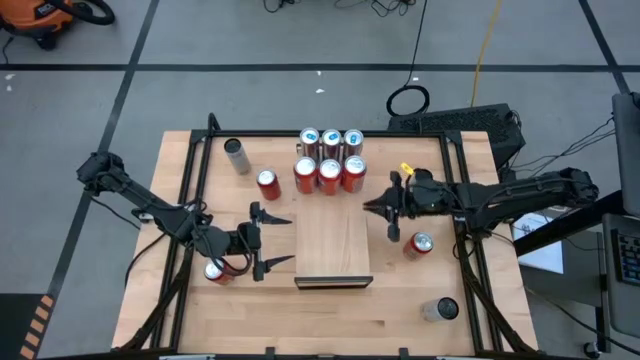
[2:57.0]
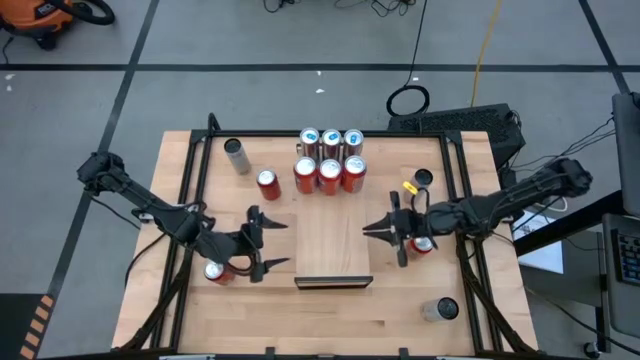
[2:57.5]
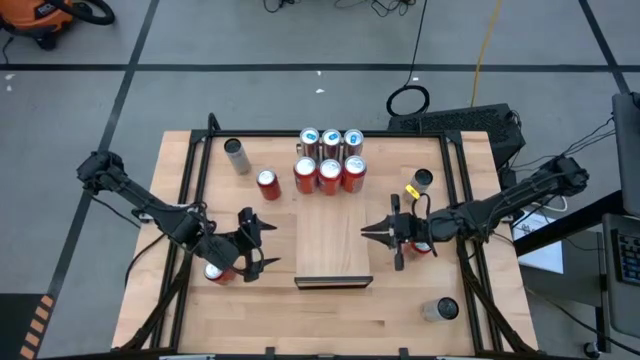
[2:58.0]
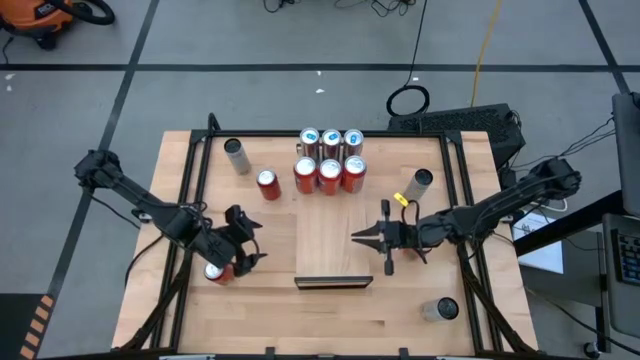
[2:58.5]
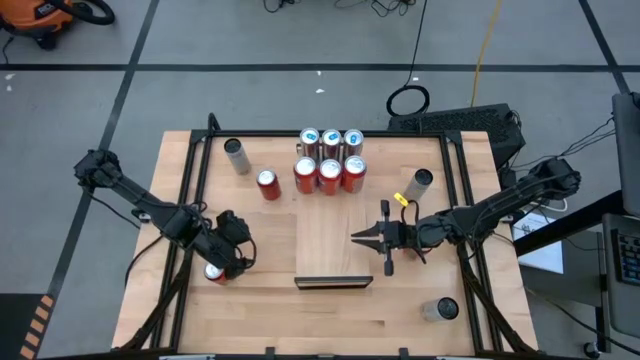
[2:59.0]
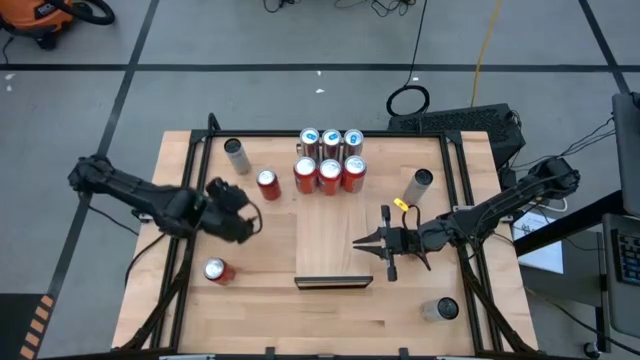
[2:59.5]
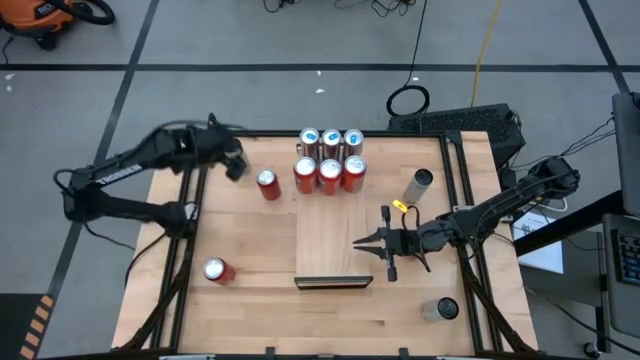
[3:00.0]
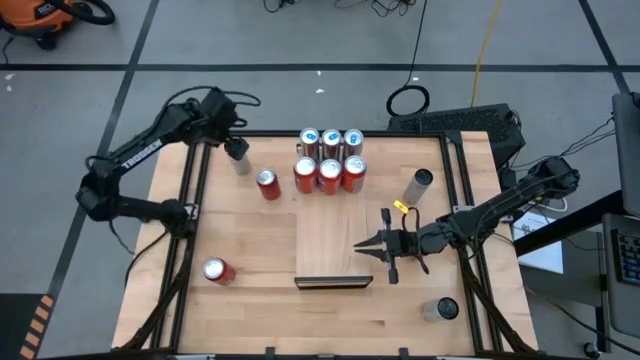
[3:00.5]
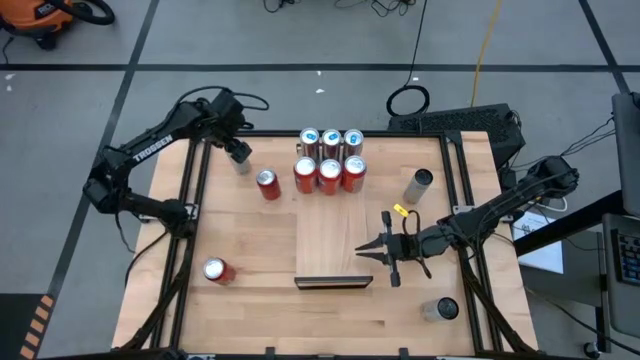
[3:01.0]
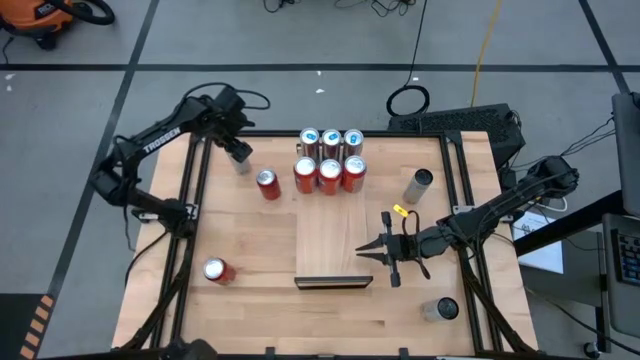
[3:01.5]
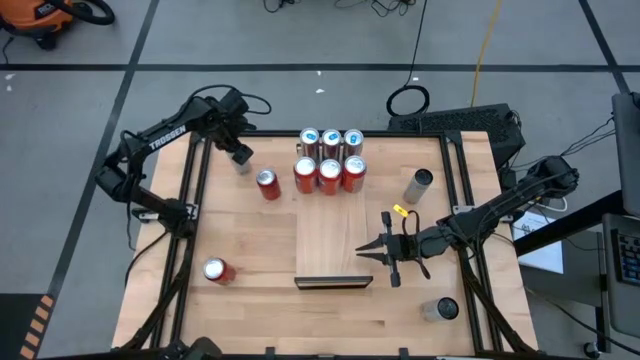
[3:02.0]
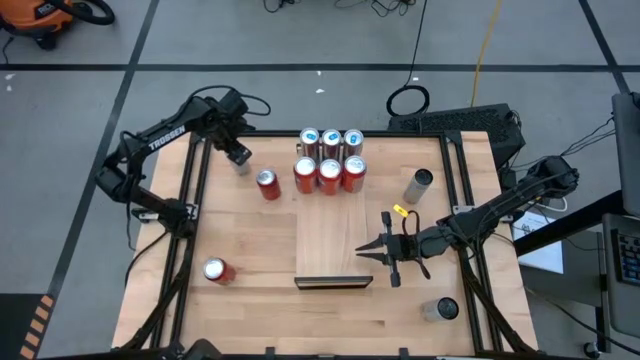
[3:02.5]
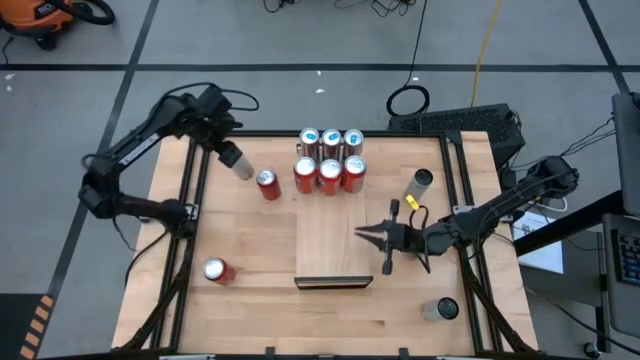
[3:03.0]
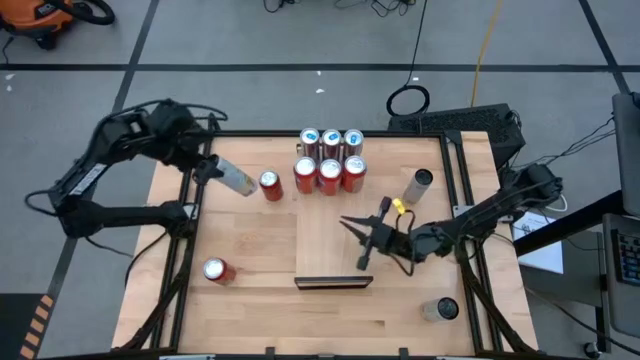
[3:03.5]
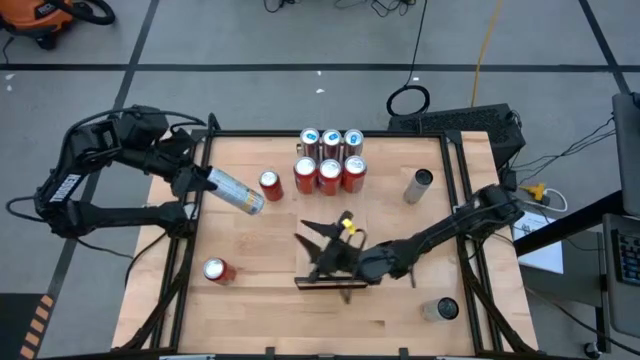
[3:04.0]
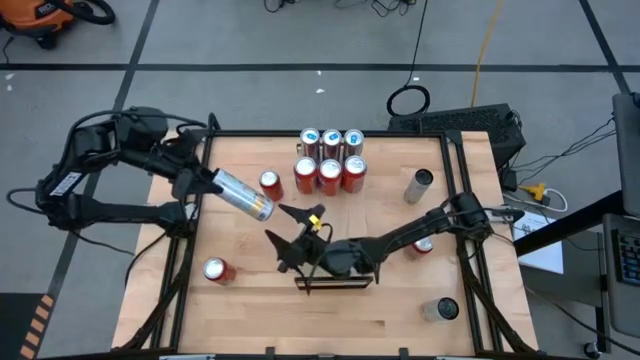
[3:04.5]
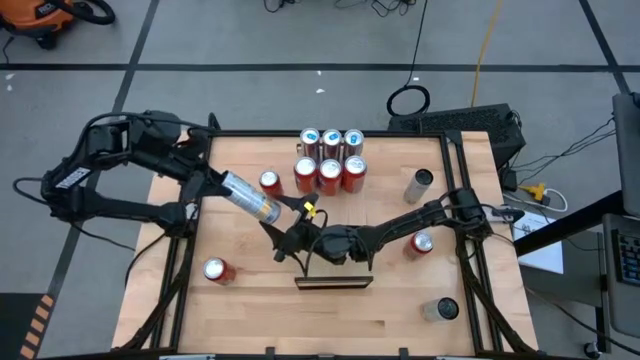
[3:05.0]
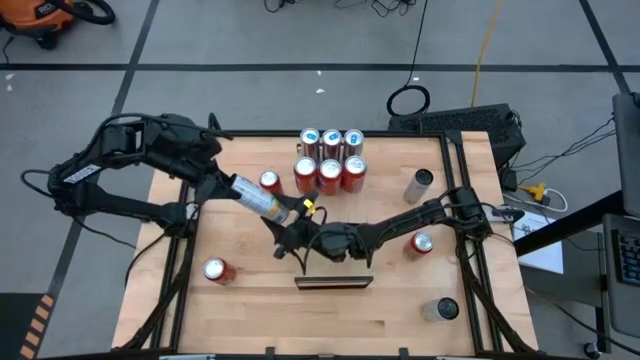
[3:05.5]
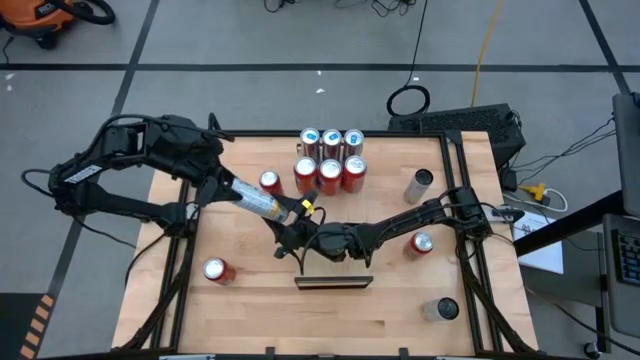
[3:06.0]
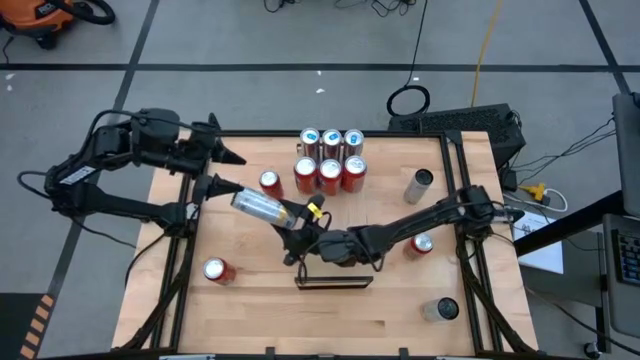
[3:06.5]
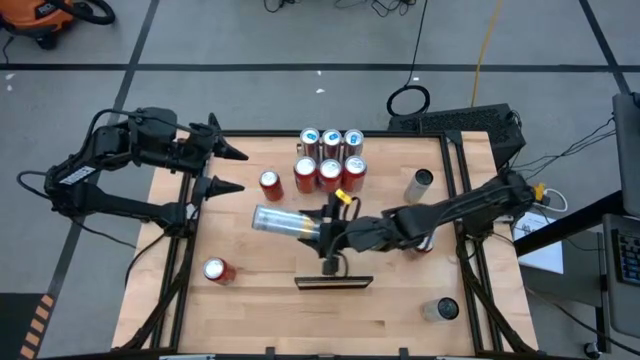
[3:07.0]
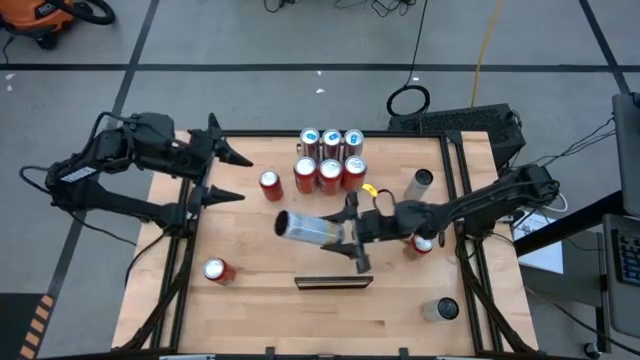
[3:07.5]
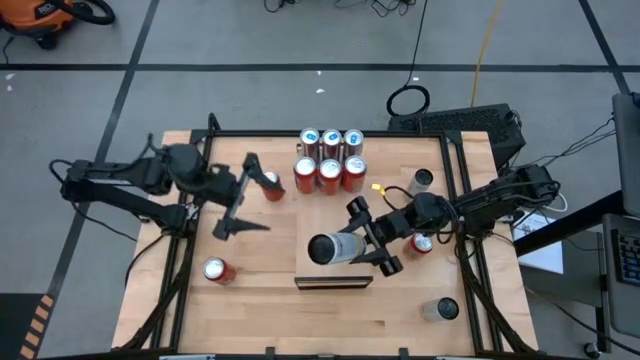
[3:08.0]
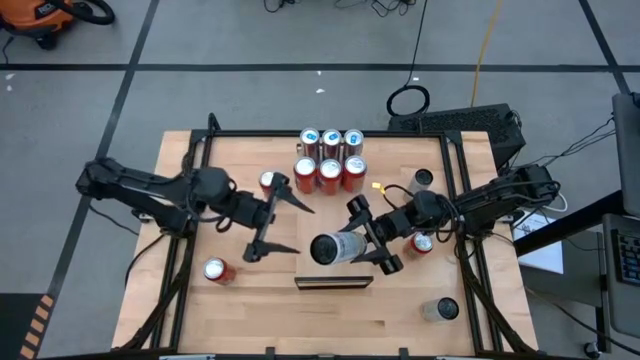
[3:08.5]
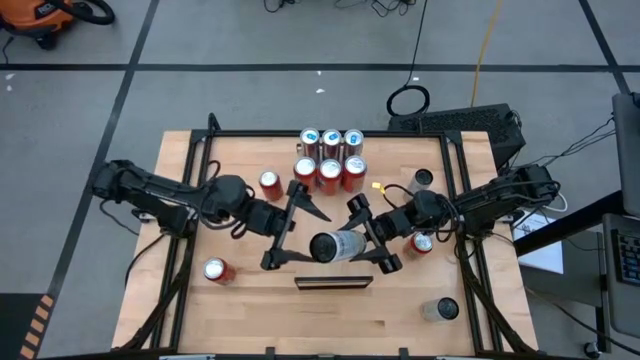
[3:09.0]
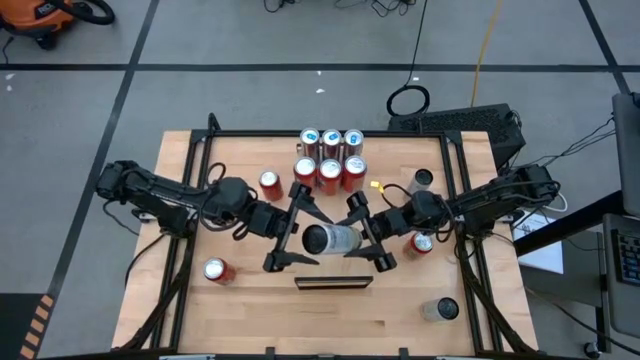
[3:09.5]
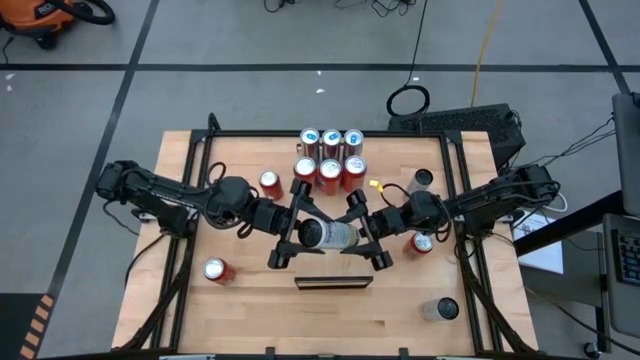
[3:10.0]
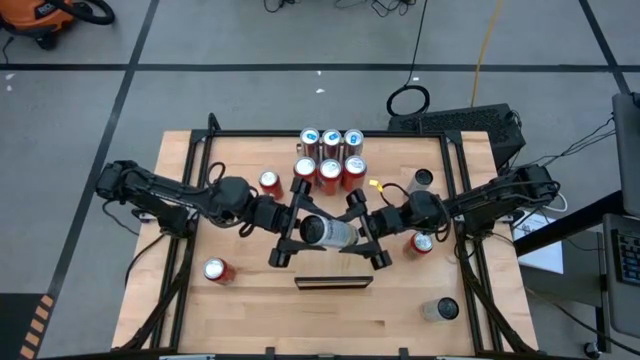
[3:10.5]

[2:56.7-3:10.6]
Task: Place canned beverage on shelf
Put the top left white yellow soda can on the shelf

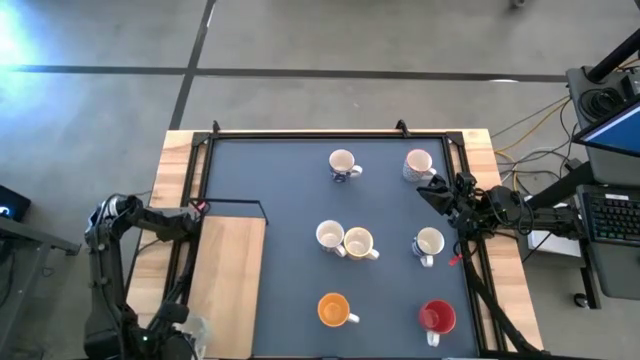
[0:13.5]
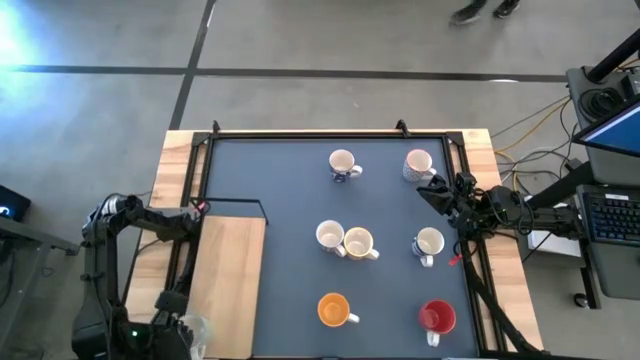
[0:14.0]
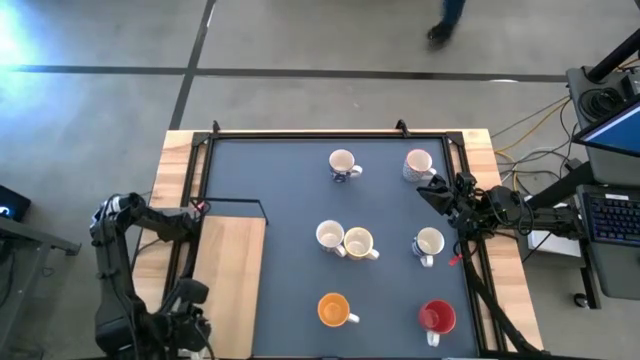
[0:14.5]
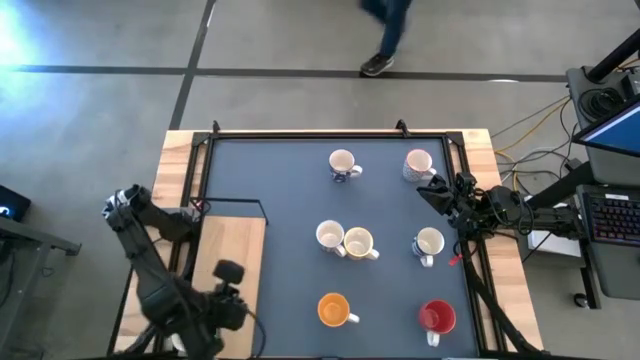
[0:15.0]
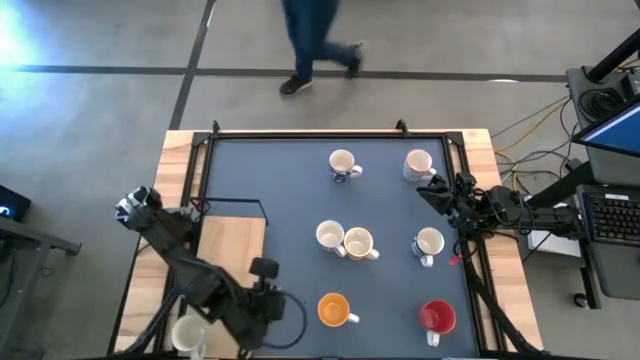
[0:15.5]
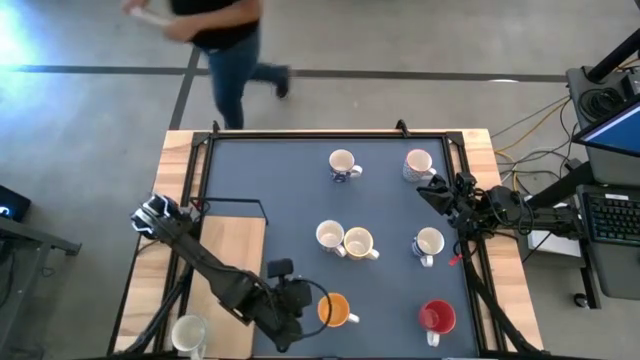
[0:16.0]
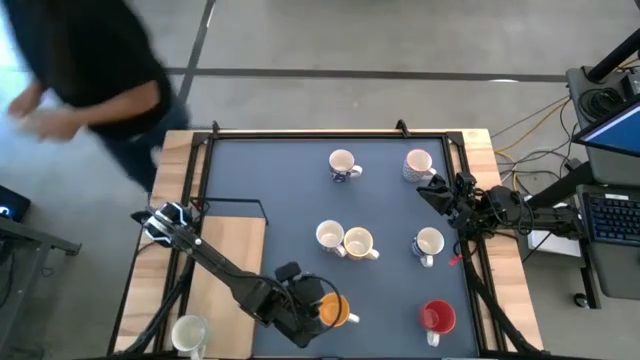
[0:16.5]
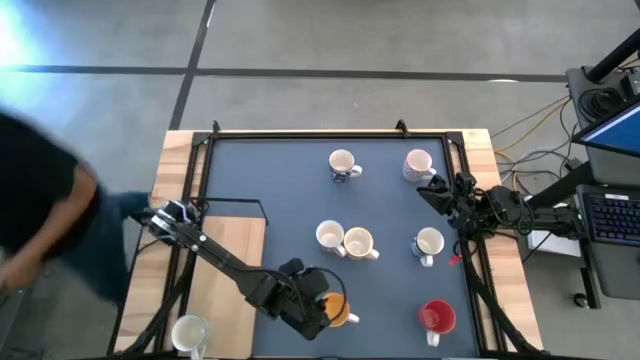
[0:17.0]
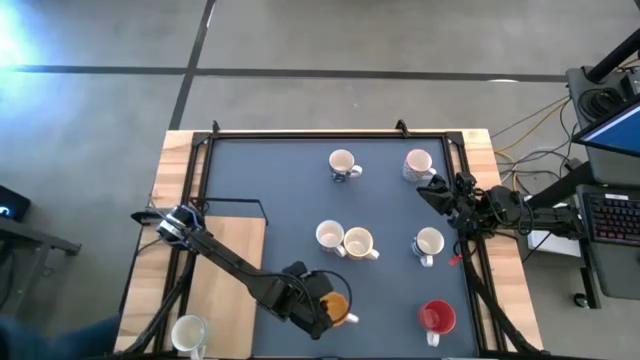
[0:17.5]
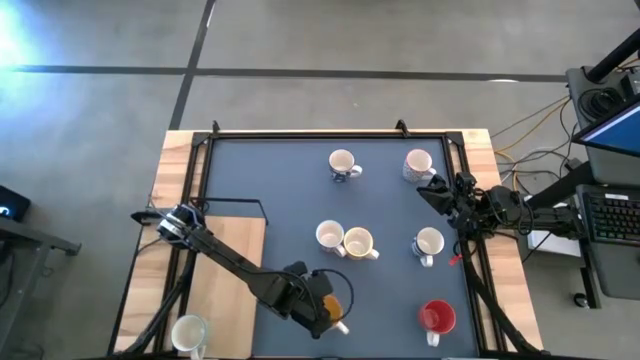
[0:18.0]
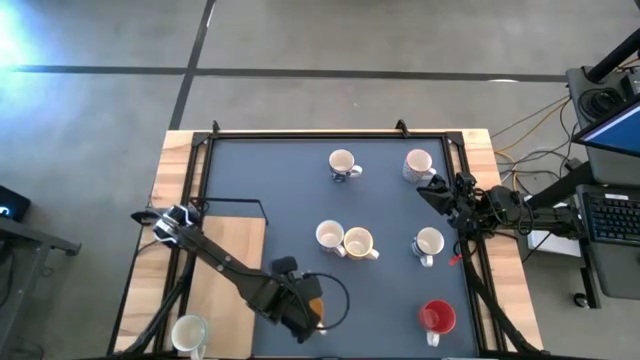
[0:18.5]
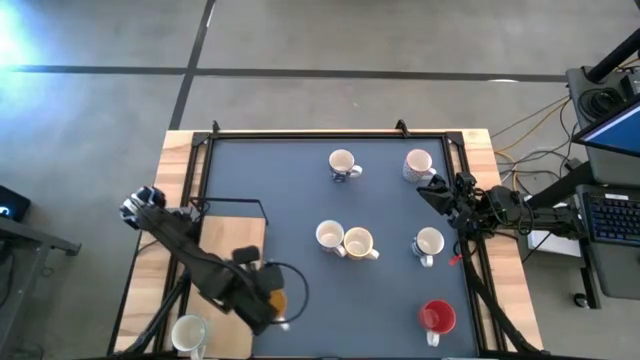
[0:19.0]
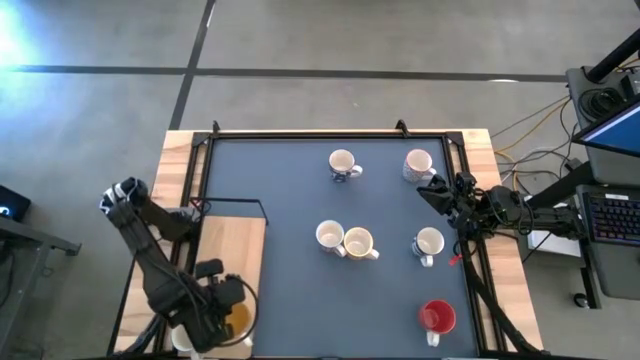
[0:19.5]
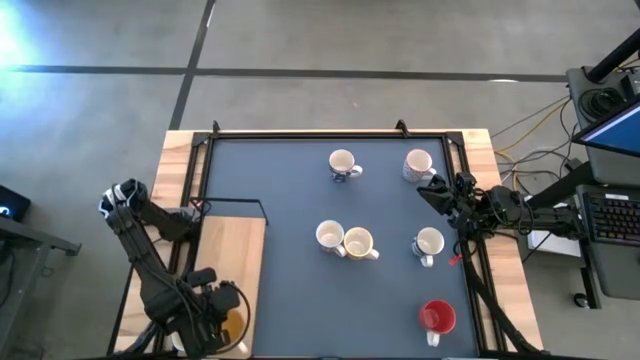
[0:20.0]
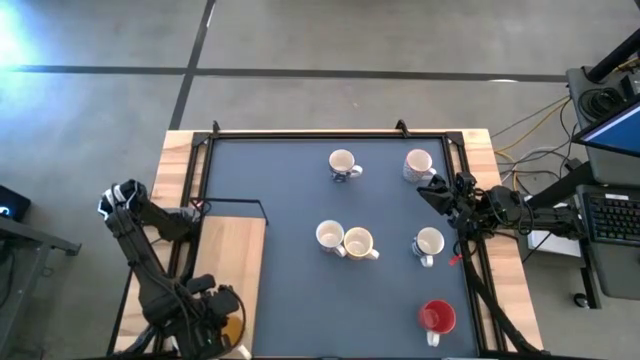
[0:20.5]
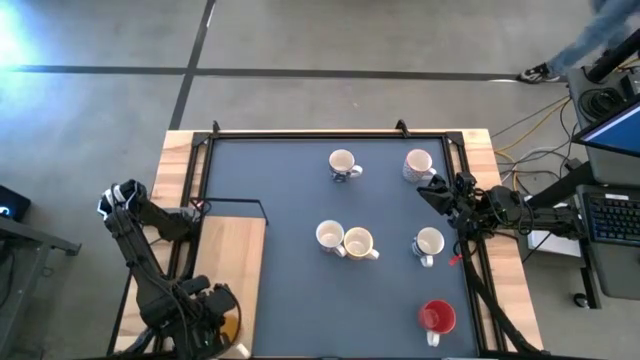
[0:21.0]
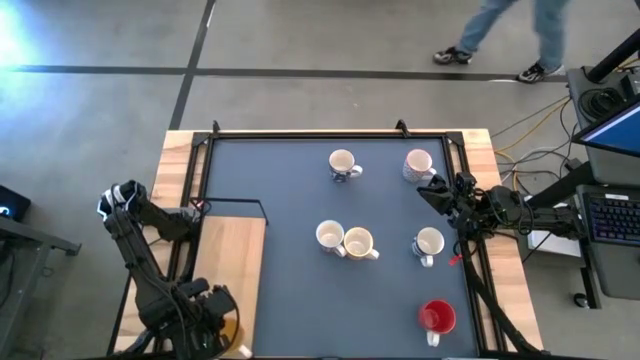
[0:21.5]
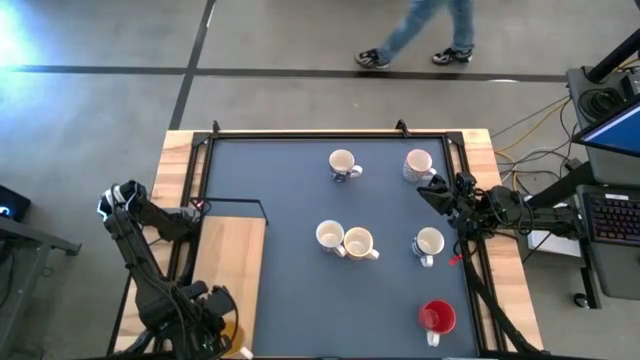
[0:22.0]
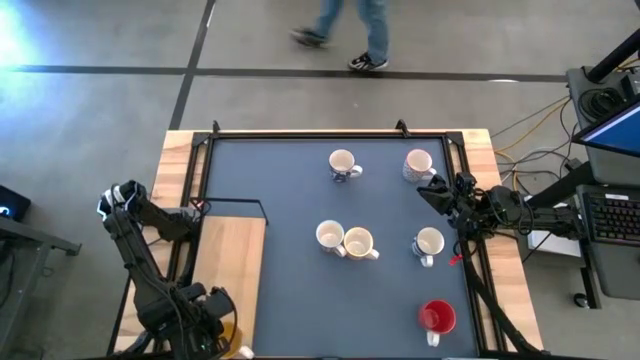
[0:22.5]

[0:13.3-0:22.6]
Task: Place coffee mugs
Put the yellow mug on the shelf
